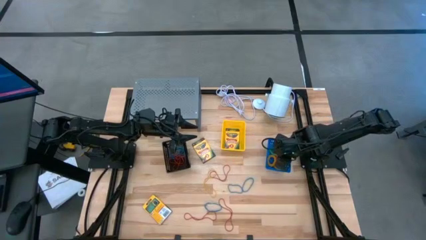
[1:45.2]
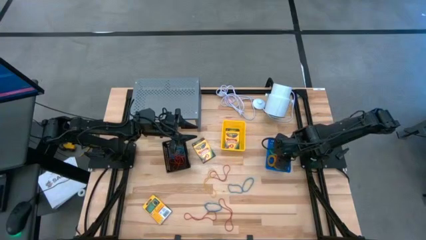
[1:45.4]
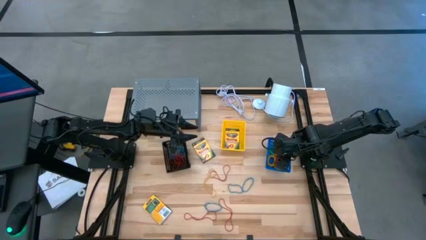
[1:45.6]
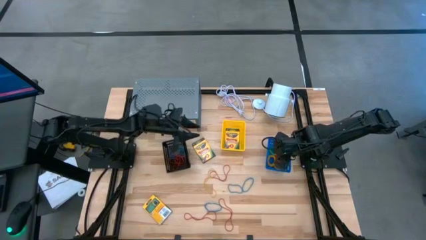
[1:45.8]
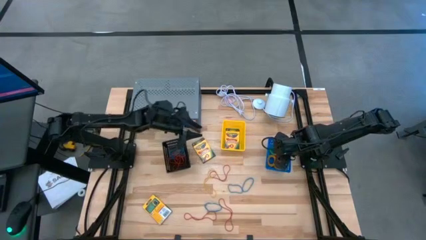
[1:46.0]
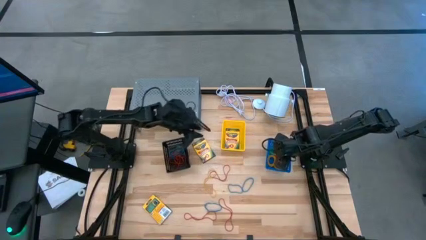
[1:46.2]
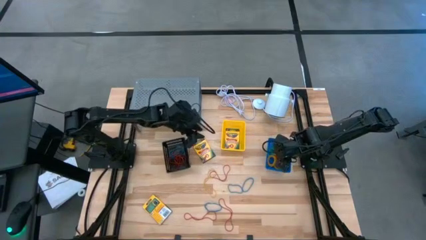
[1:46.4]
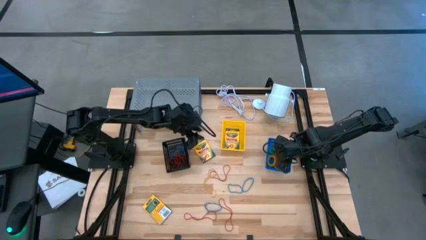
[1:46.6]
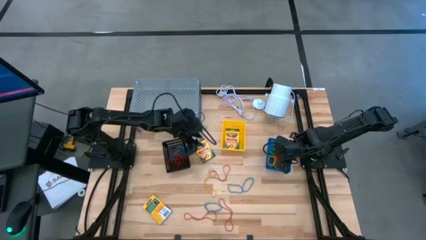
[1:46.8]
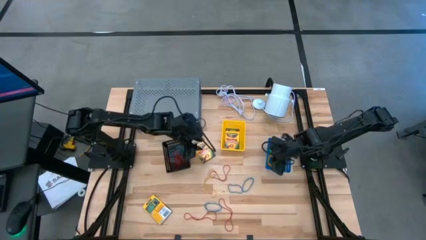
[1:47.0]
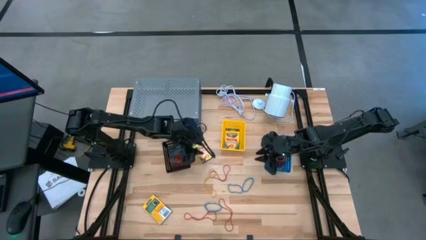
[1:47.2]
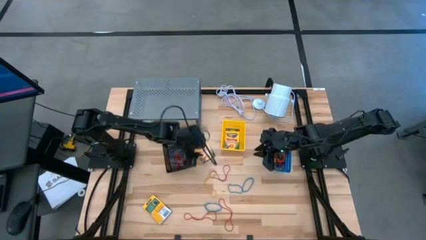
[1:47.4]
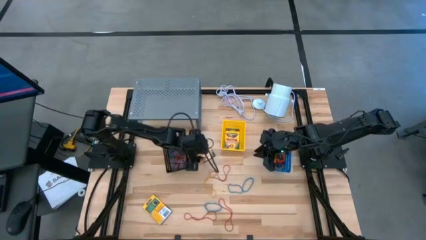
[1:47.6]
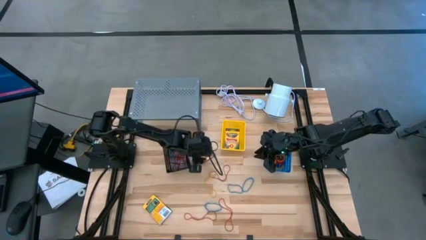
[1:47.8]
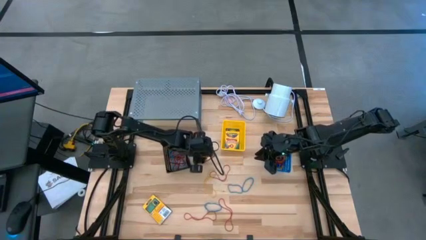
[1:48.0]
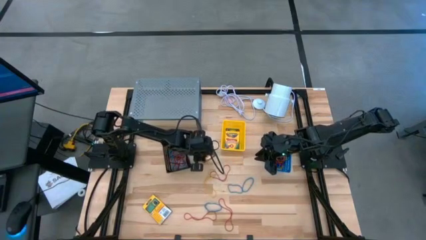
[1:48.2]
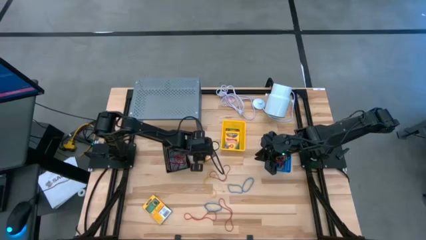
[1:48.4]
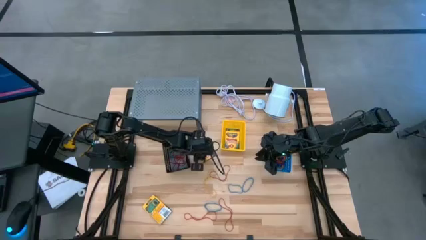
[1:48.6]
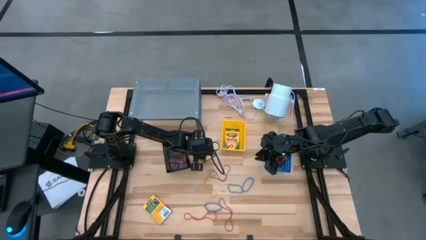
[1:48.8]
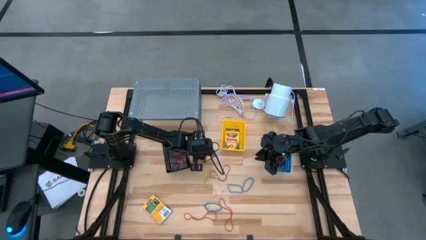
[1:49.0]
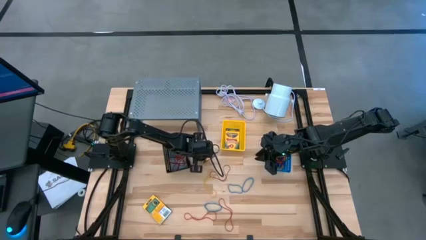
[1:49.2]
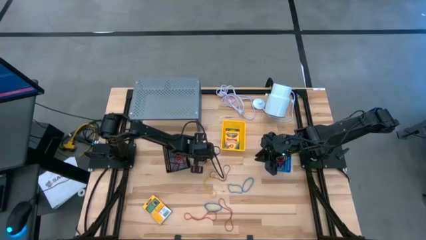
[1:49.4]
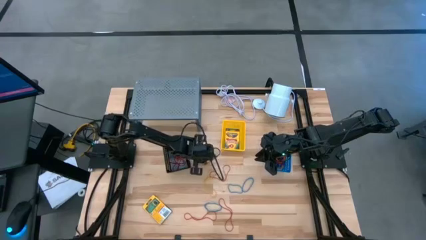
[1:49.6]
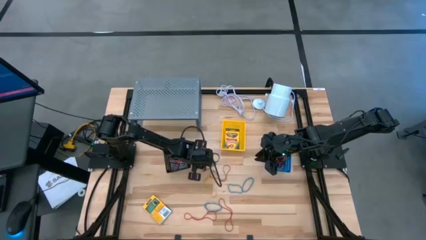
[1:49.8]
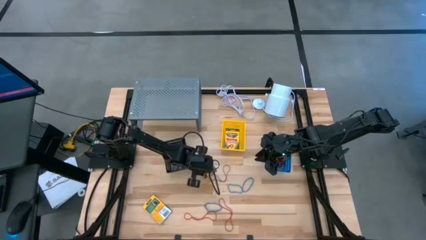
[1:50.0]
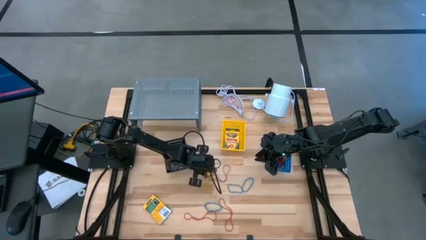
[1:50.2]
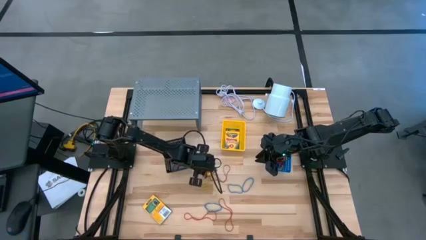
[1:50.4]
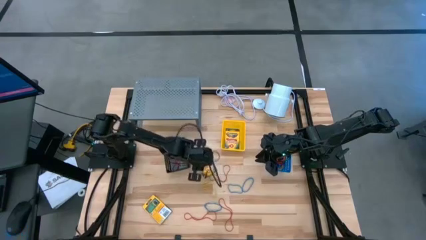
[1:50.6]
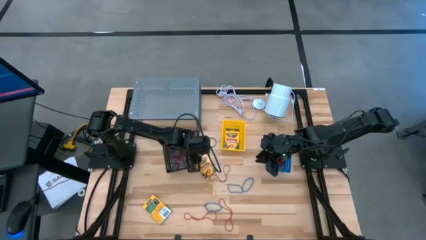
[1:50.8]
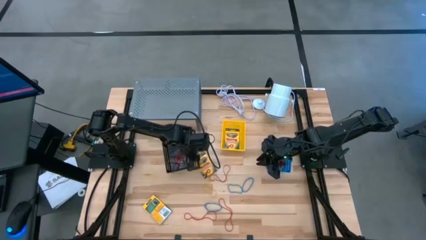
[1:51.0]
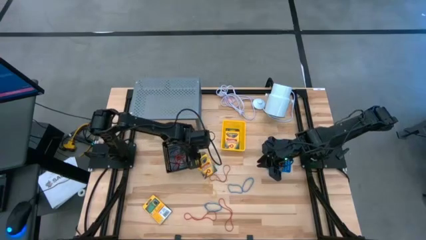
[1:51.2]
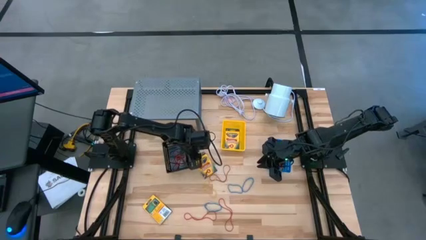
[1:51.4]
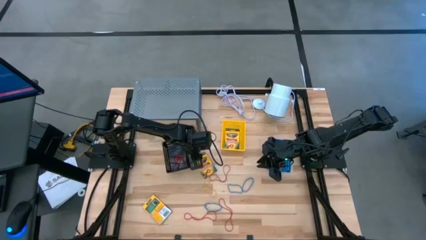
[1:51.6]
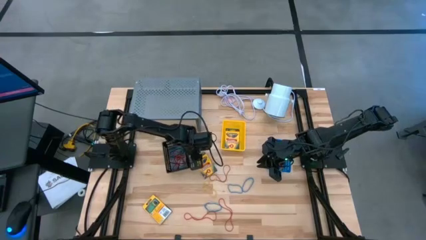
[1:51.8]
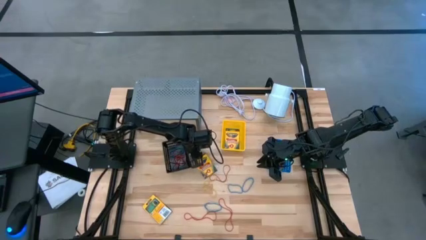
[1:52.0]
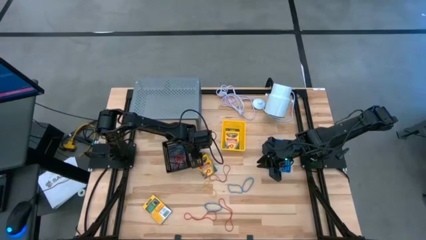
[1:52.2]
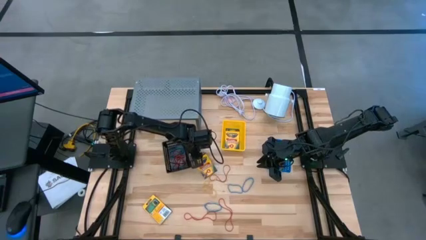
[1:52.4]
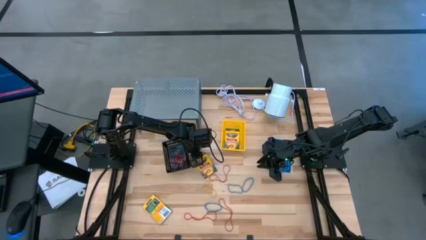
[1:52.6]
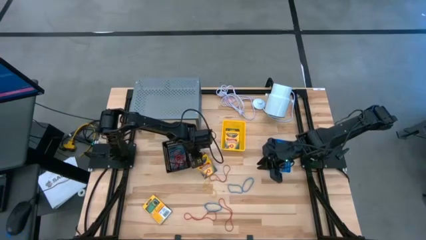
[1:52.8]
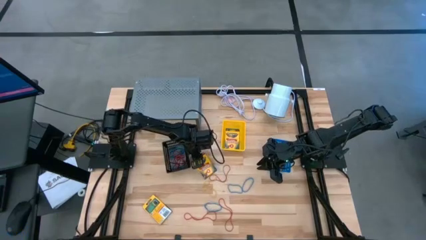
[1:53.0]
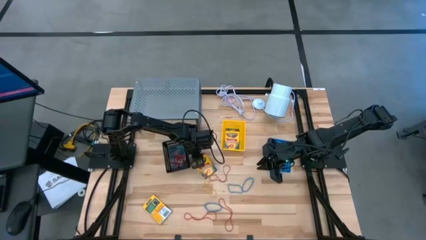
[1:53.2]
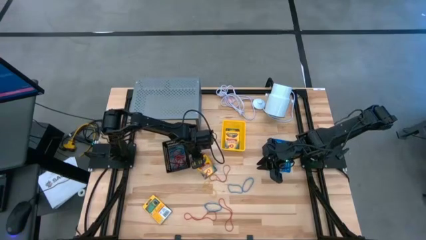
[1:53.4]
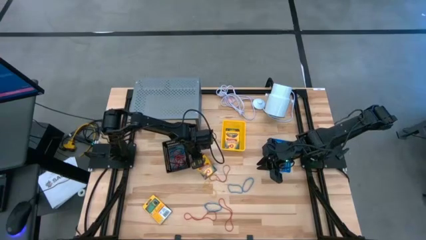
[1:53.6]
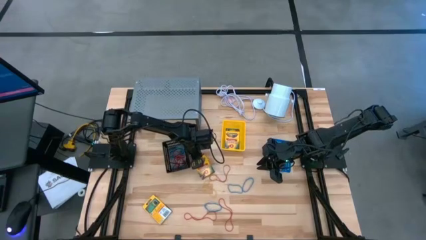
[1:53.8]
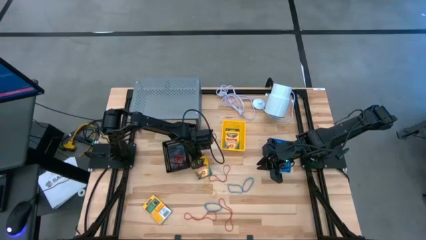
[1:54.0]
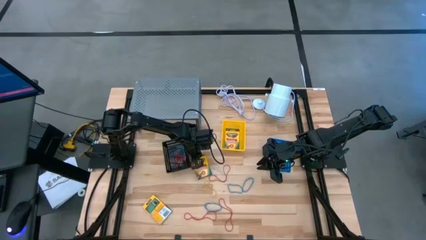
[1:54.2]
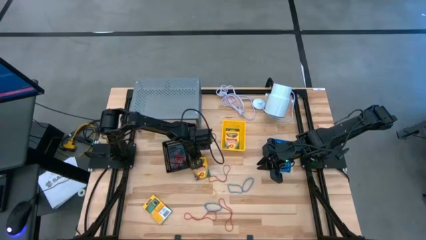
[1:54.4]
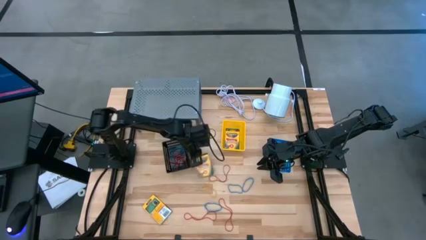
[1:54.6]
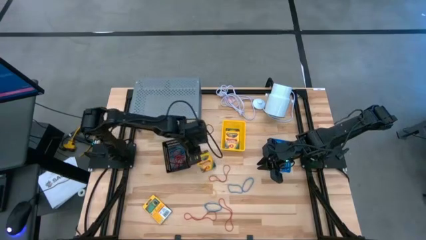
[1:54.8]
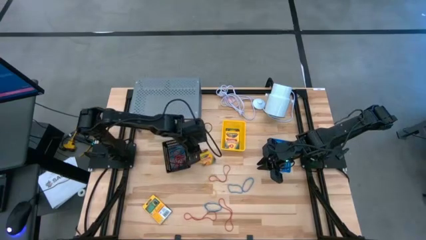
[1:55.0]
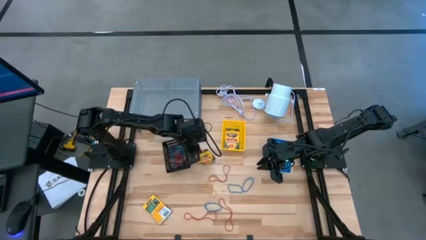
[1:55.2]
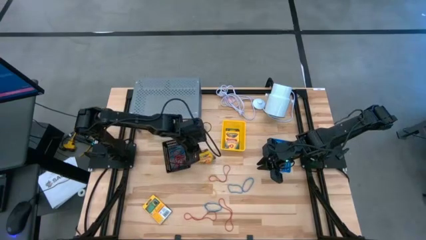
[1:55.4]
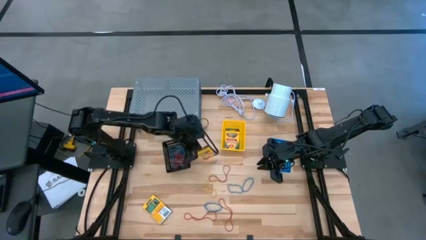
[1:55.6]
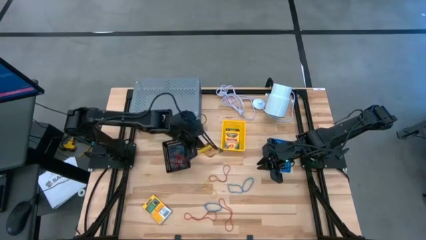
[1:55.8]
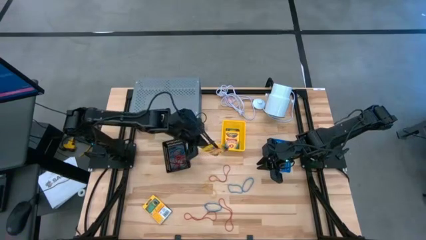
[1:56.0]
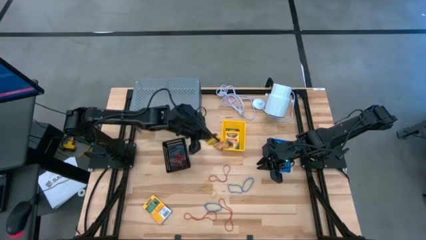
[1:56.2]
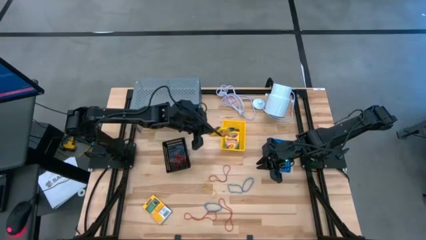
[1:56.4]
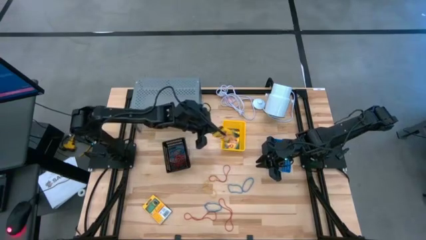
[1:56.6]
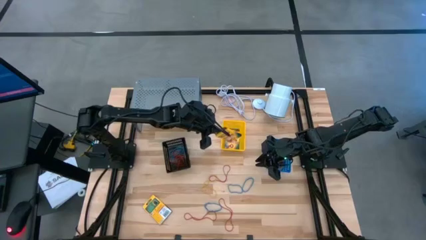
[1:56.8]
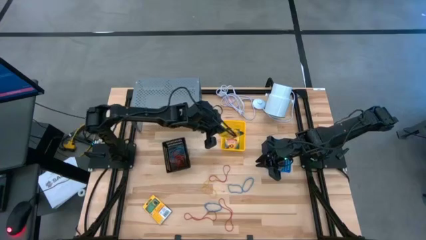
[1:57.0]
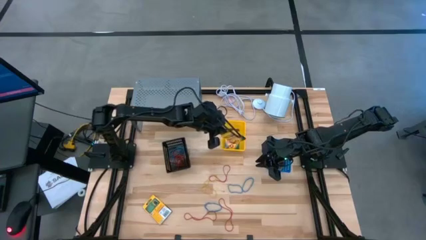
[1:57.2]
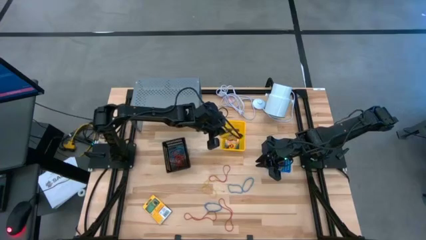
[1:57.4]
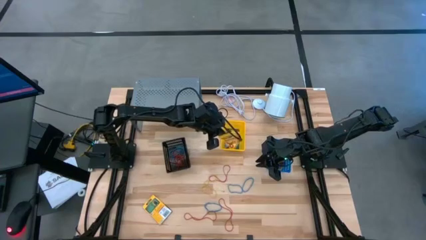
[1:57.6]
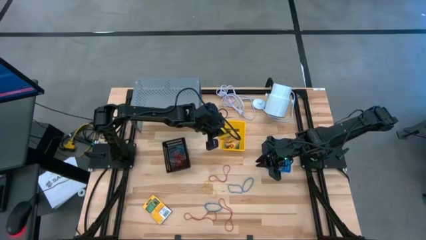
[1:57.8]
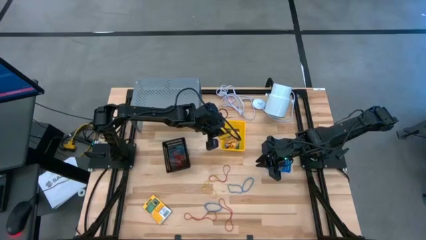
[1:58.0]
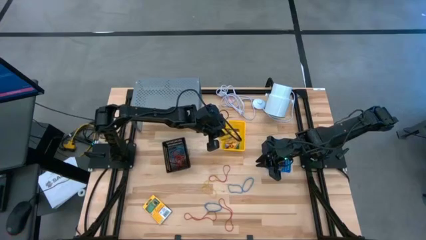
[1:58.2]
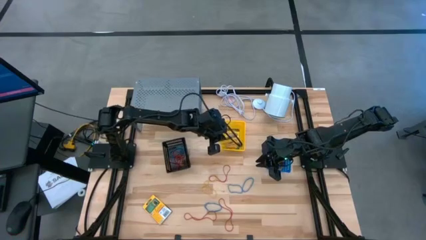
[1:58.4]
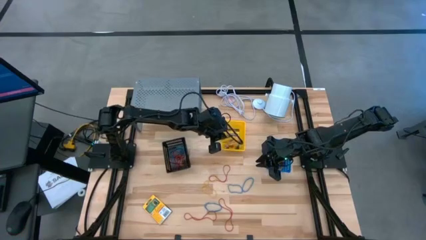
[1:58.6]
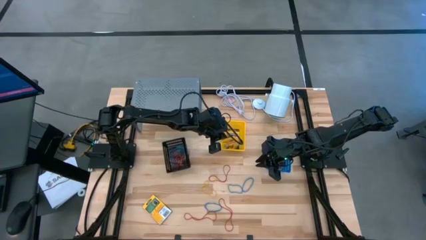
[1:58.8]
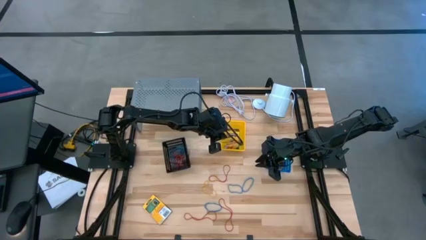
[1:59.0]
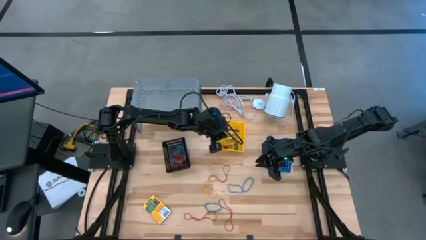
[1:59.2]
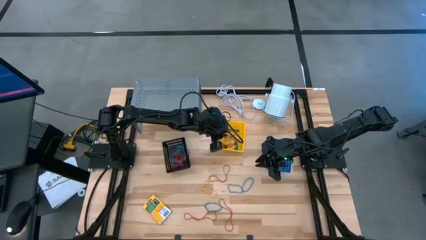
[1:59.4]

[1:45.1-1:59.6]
Task: Pick & Place Office Desk Supplies
Put the yellow crayon box into the yellow bin
